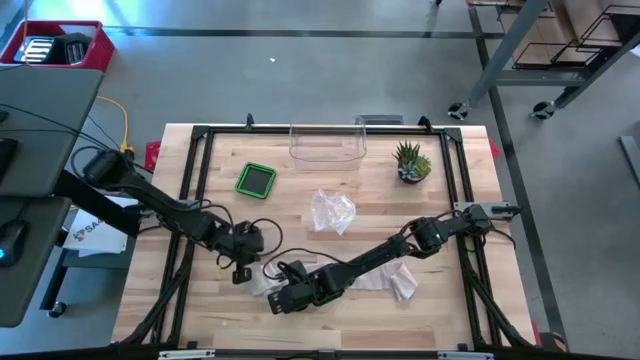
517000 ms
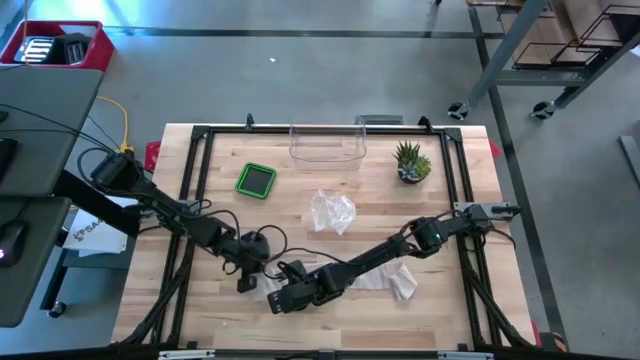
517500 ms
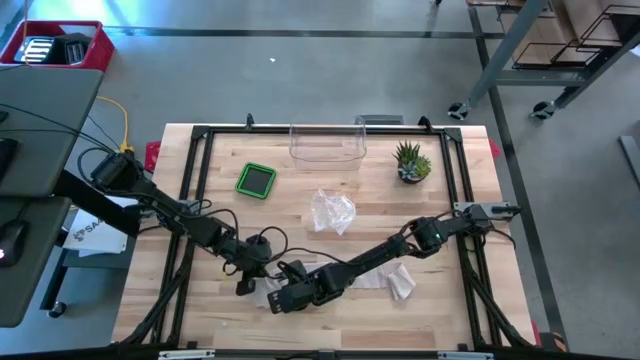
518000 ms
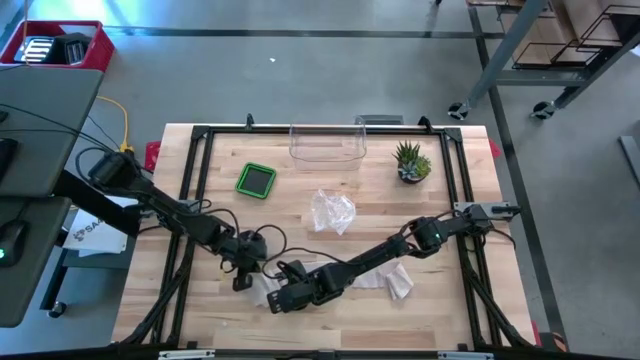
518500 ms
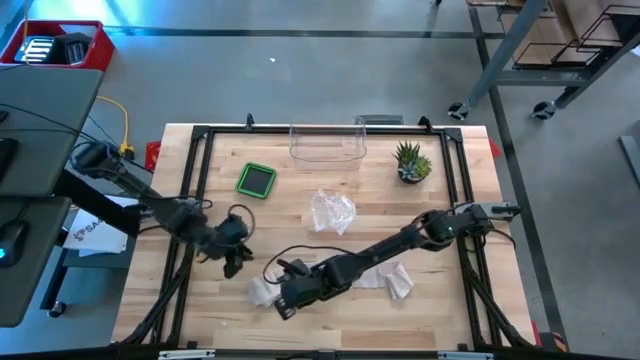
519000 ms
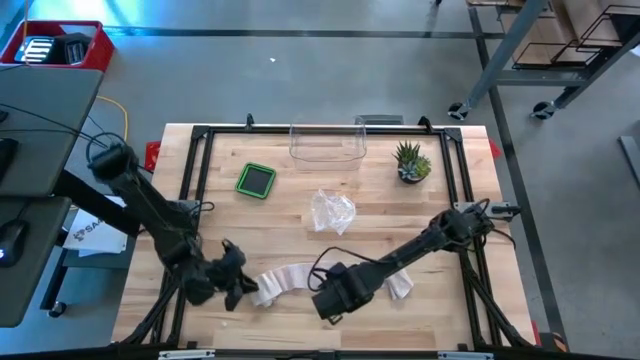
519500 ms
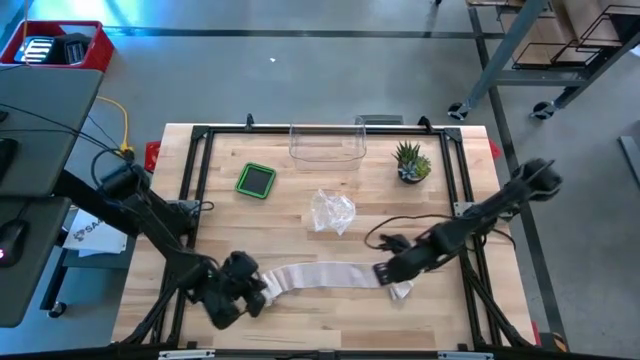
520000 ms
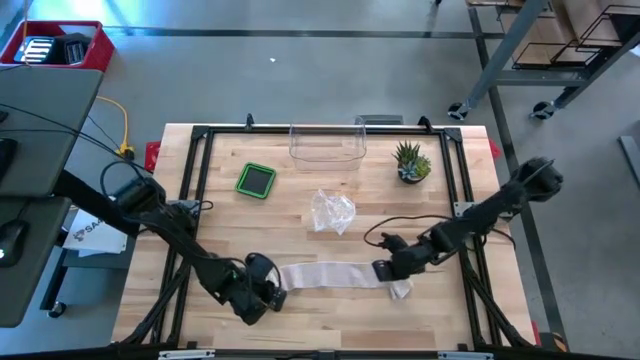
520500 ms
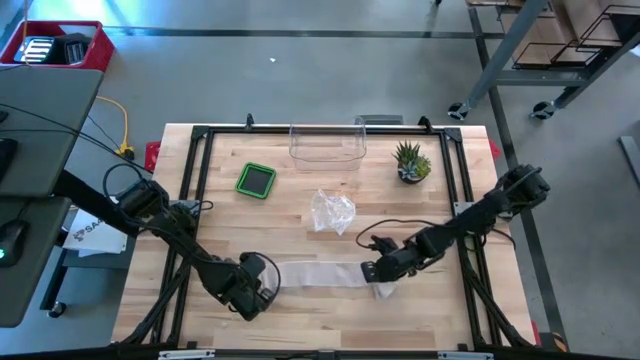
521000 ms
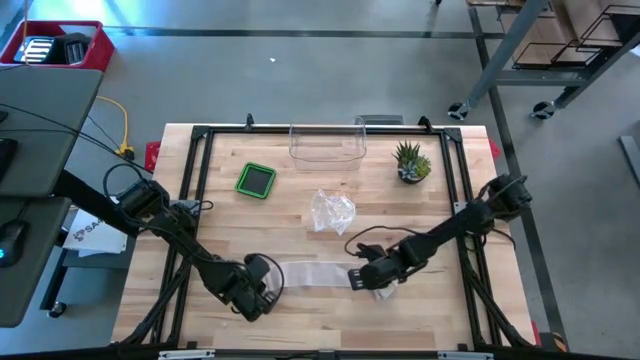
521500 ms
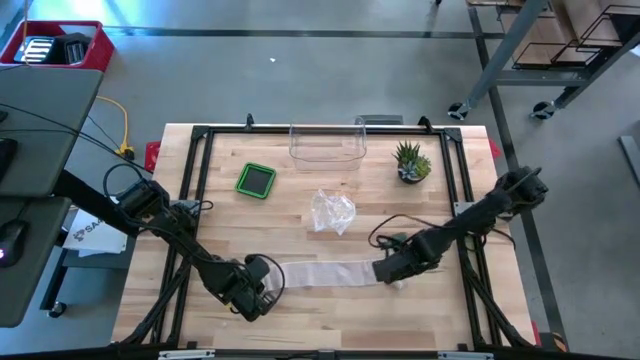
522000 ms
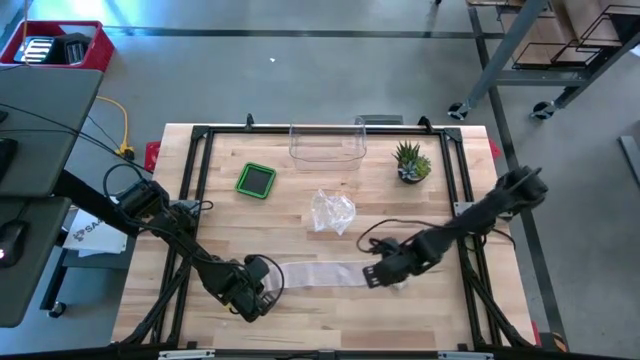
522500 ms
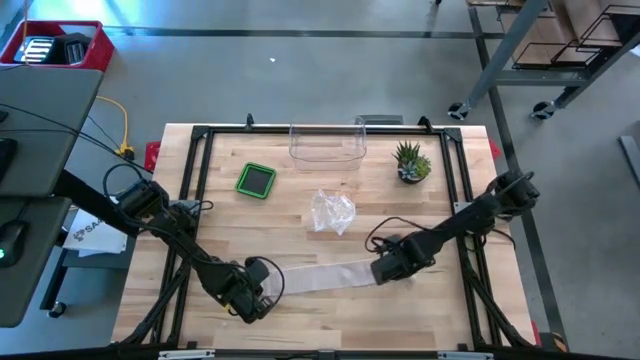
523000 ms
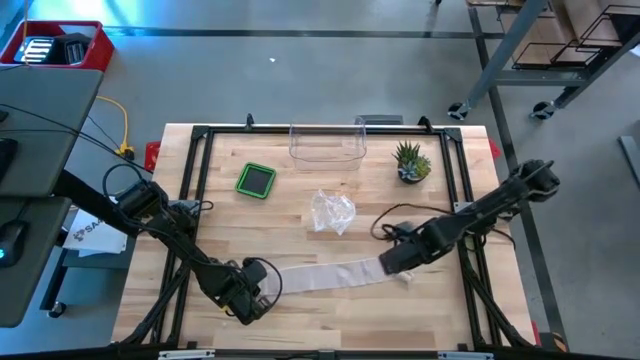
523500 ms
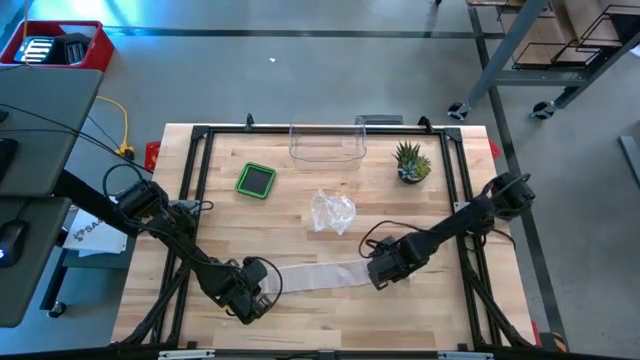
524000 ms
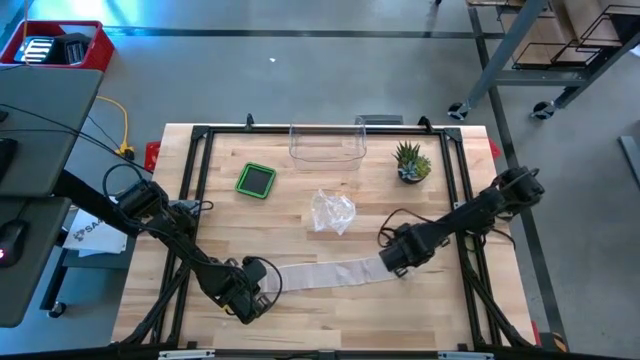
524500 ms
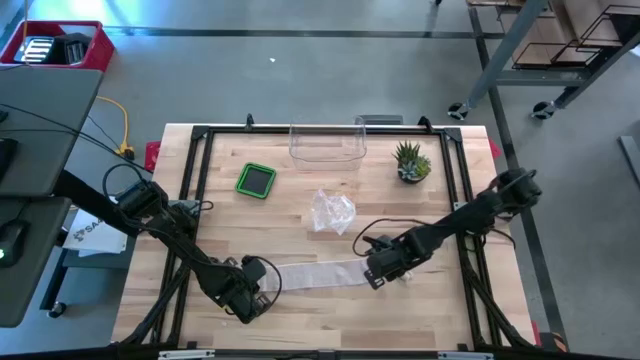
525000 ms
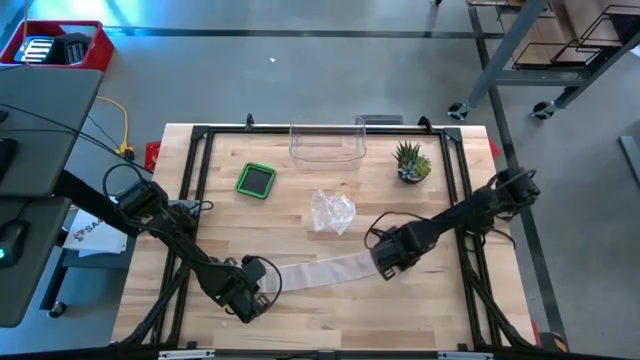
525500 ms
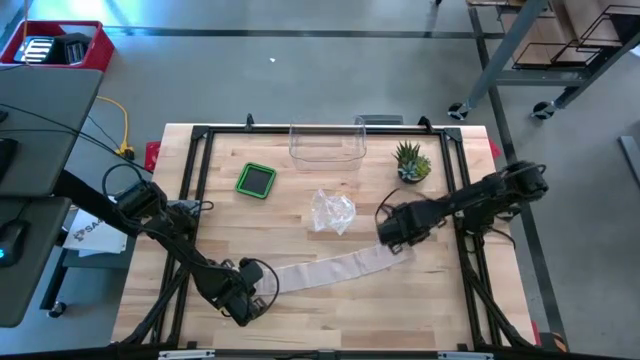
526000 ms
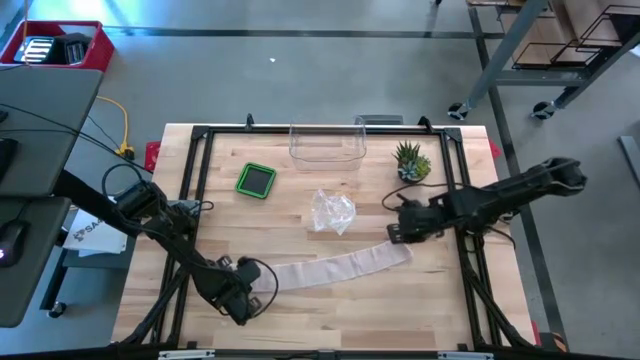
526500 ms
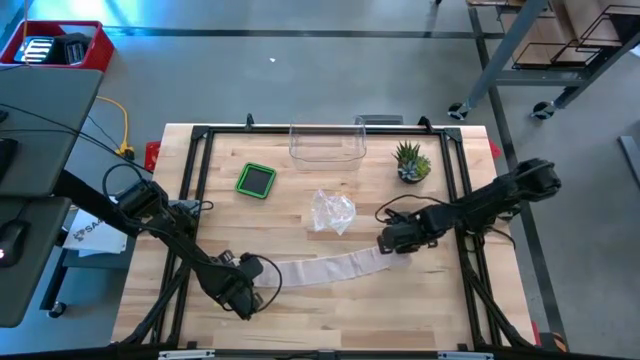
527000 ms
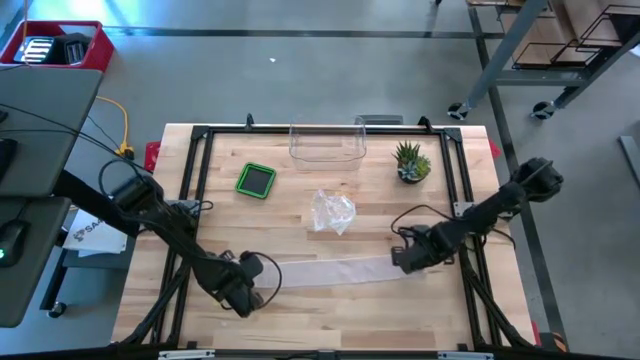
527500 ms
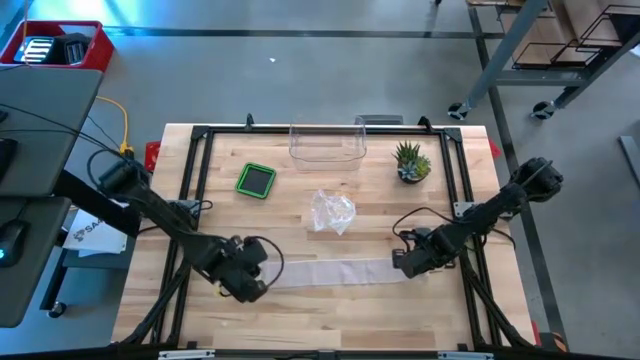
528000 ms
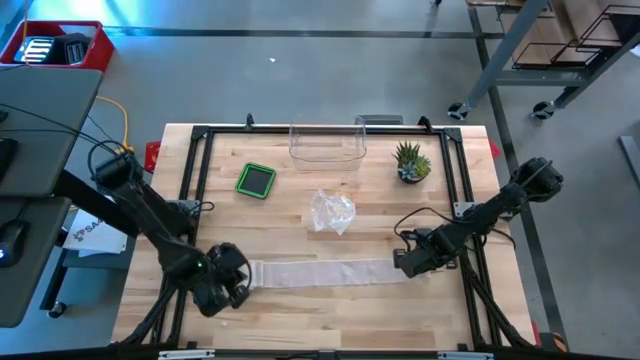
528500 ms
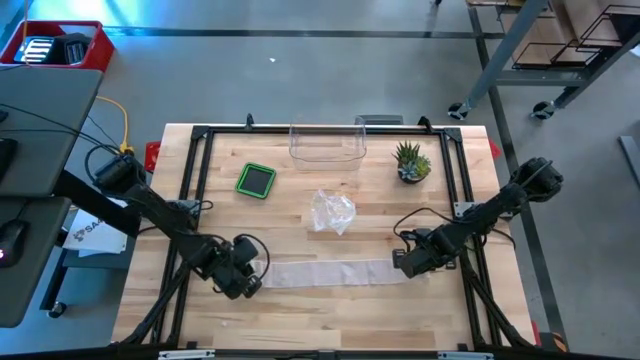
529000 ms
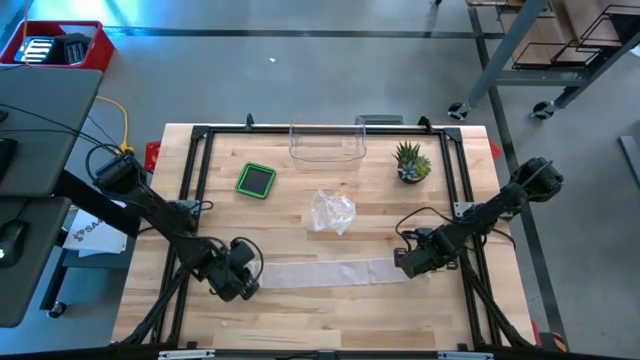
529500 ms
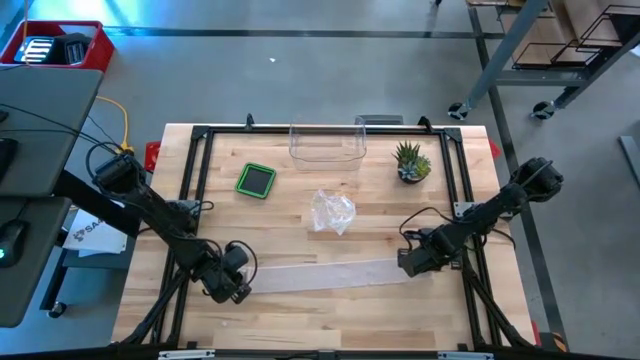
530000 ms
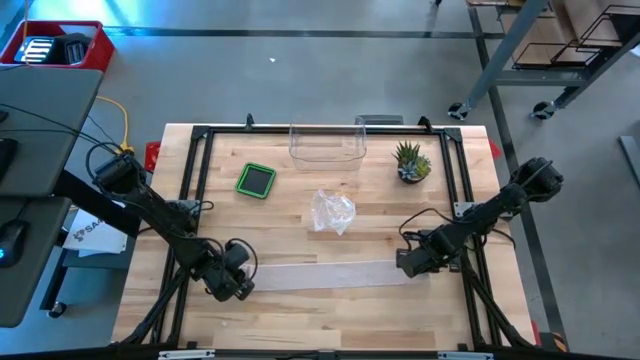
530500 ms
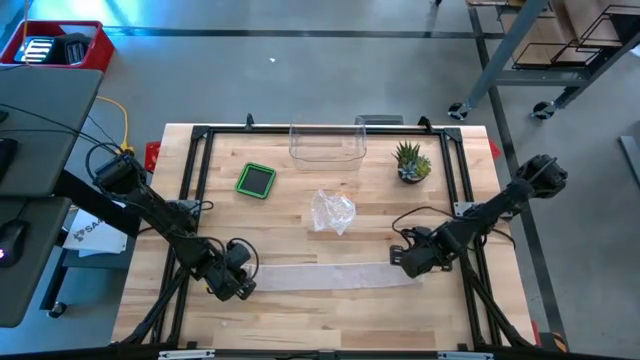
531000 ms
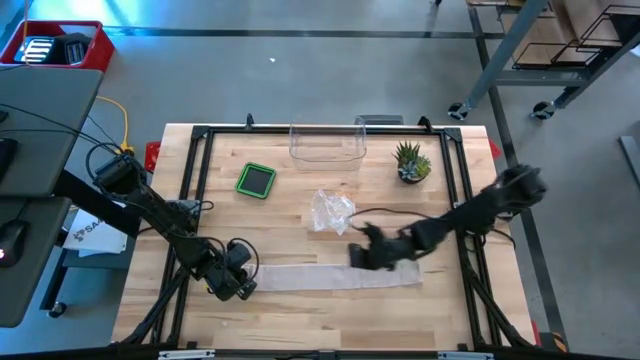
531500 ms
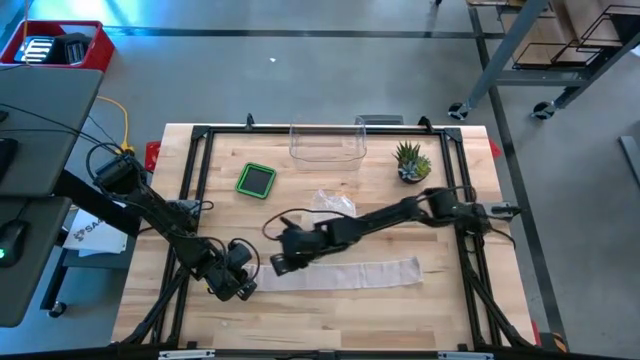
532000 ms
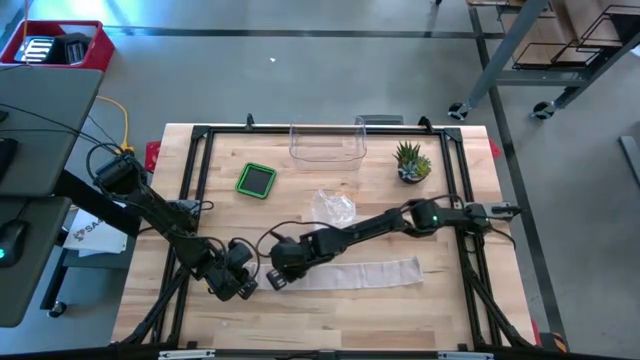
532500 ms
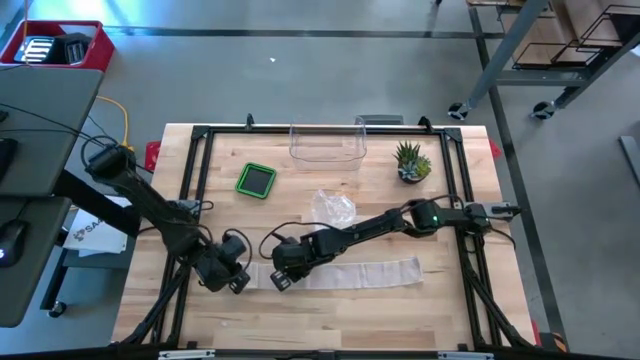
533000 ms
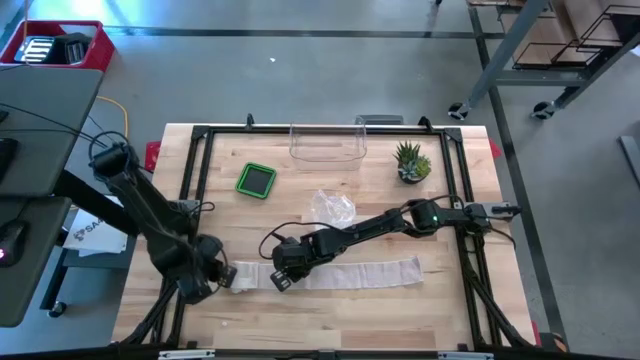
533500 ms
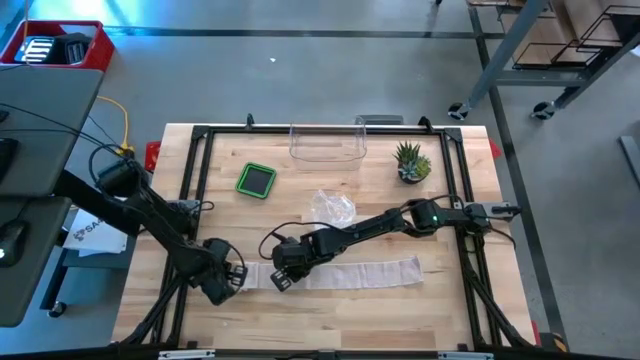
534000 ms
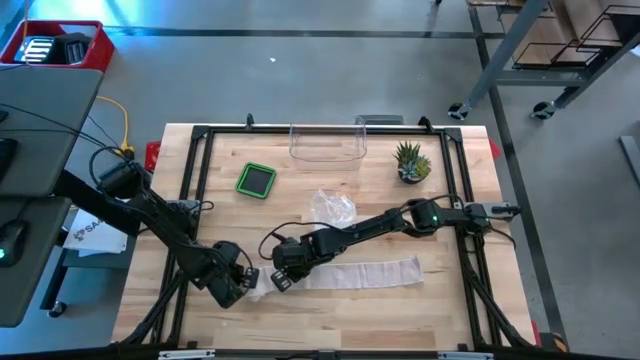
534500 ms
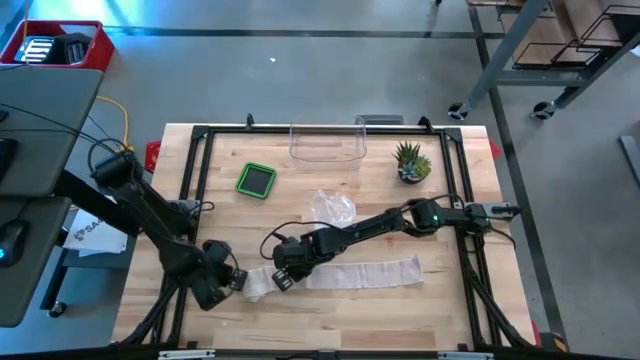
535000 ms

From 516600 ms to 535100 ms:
Task: Roll bandage
Roll the bandage

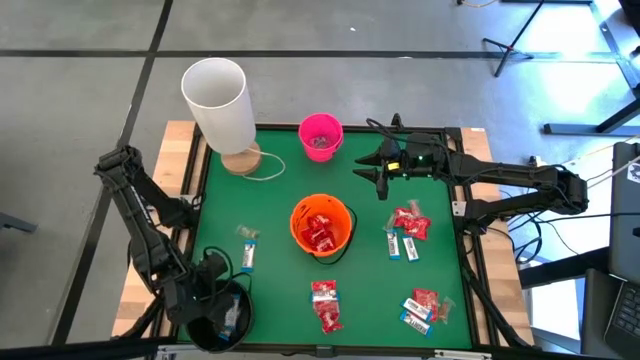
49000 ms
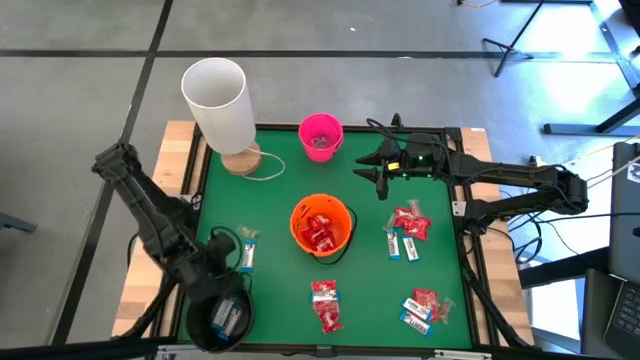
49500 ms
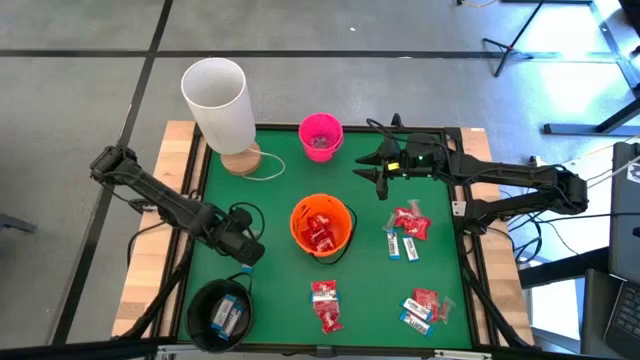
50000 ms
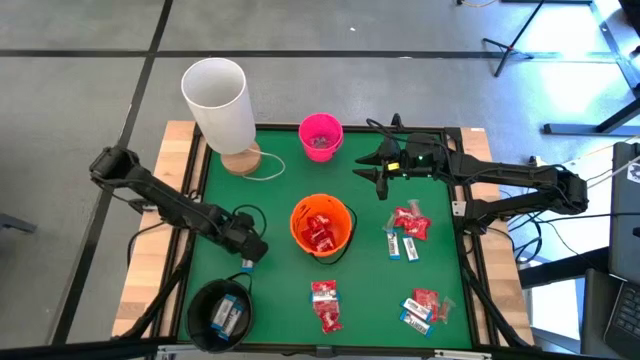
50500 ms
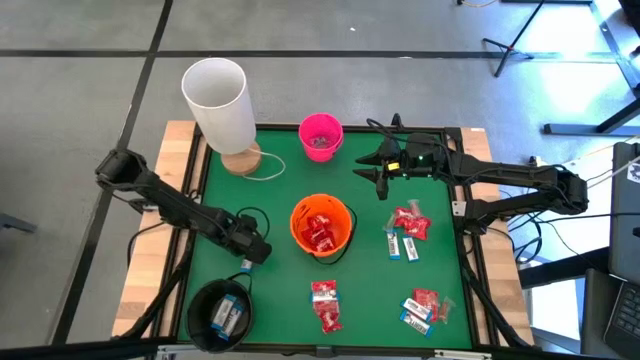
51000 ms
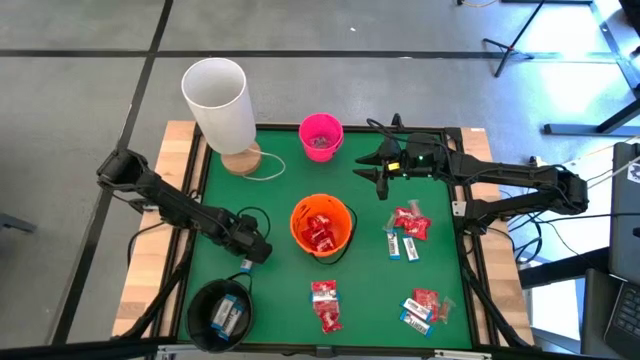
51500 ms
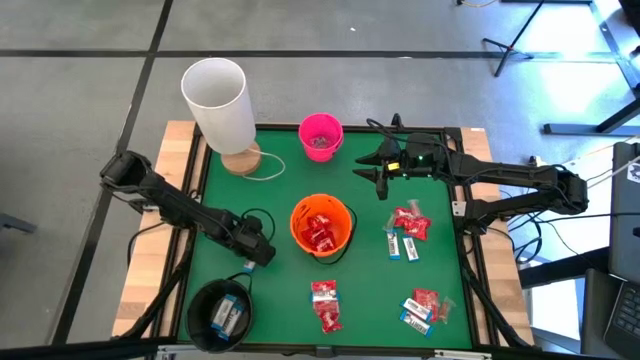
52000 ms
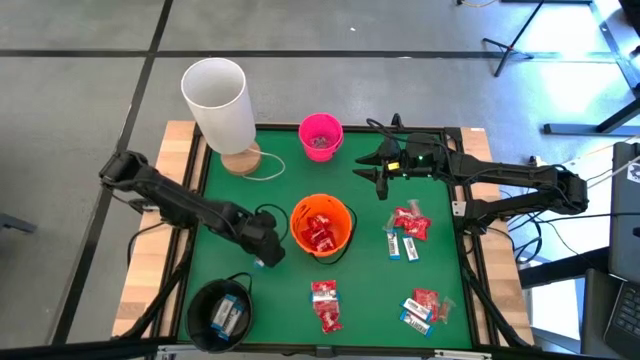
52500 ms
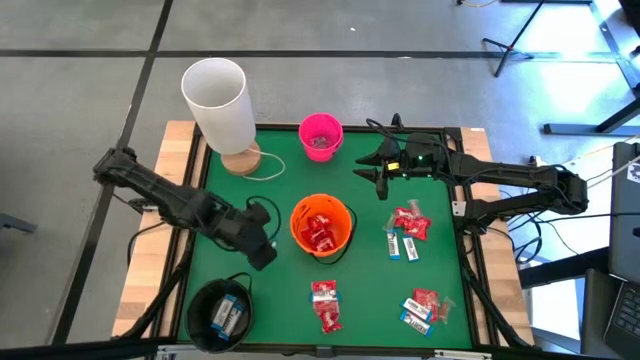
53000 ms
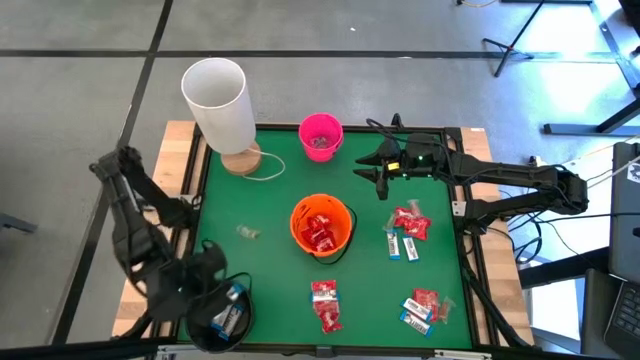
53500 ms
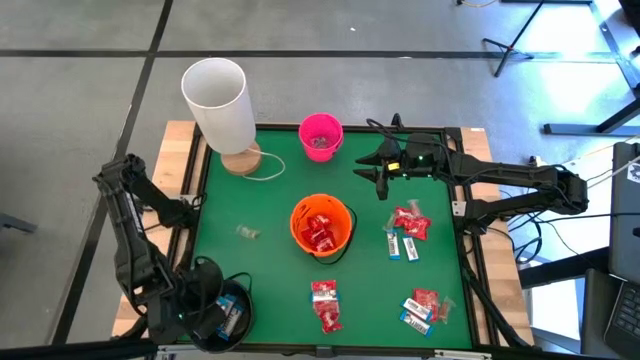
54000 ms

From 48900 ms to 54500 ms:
Task: Sort candy
Put the white chocolate into the black bucket
